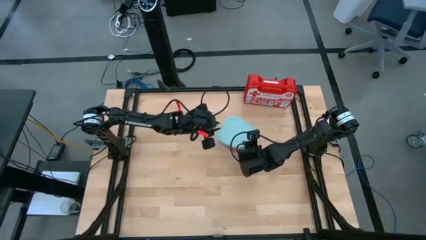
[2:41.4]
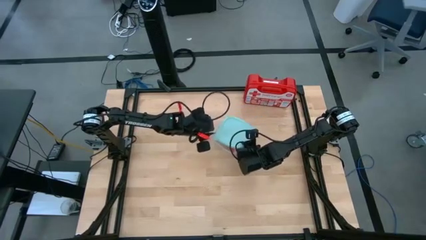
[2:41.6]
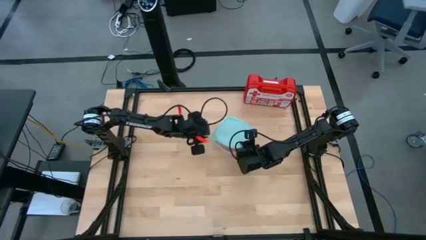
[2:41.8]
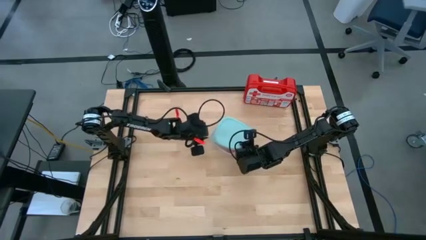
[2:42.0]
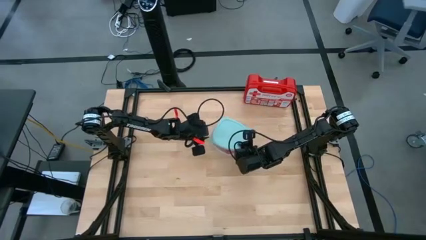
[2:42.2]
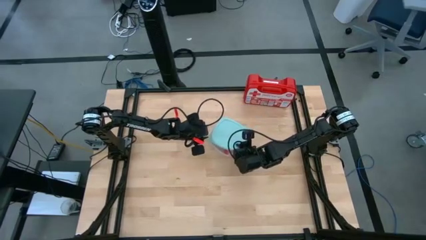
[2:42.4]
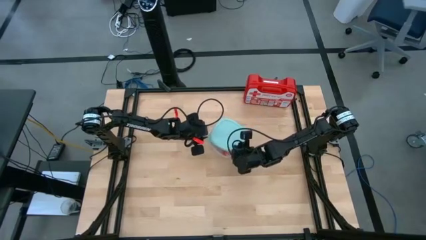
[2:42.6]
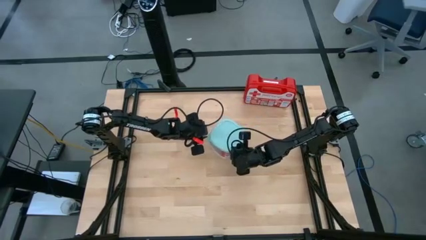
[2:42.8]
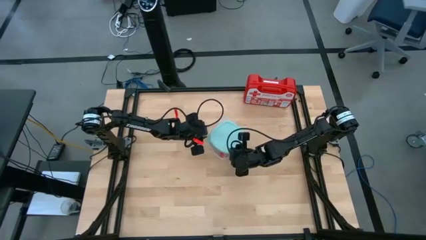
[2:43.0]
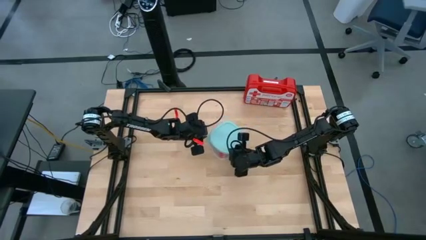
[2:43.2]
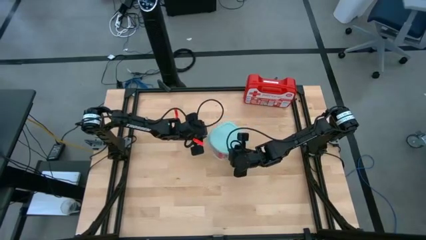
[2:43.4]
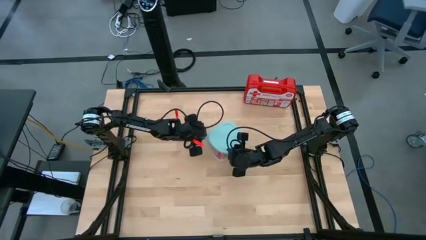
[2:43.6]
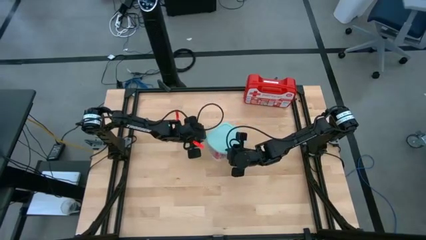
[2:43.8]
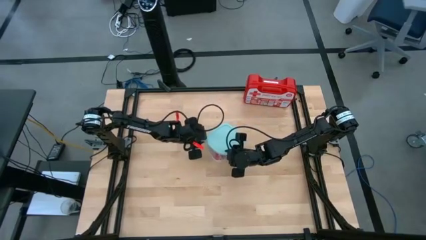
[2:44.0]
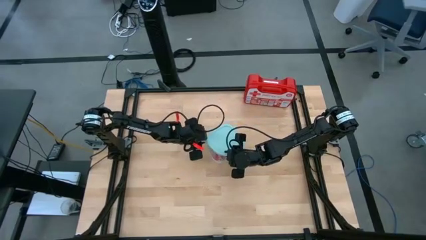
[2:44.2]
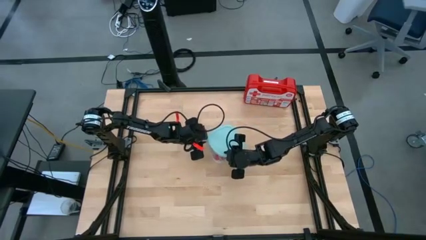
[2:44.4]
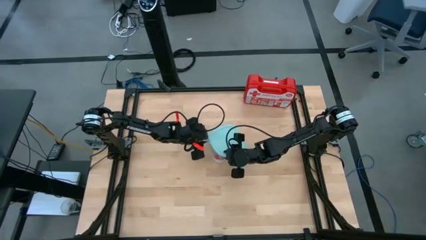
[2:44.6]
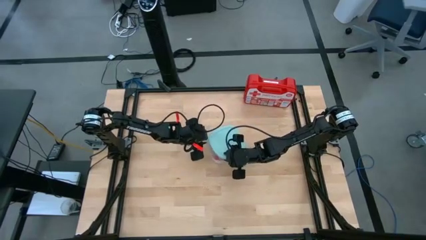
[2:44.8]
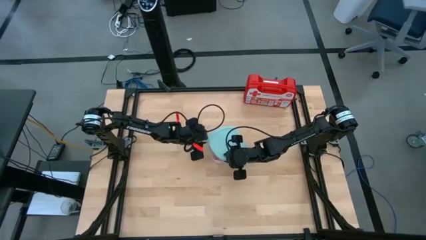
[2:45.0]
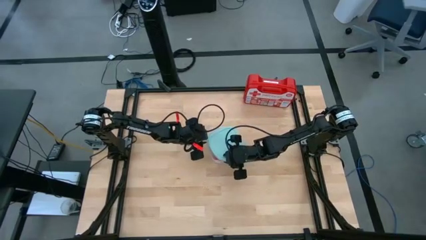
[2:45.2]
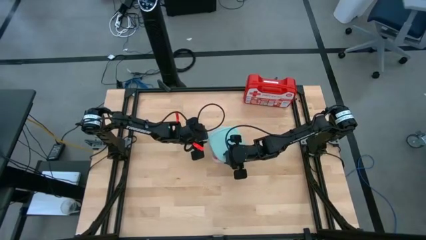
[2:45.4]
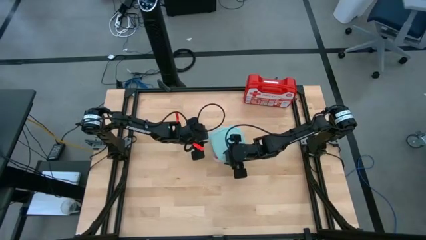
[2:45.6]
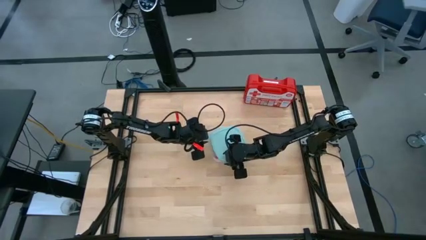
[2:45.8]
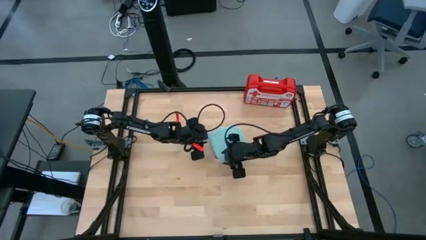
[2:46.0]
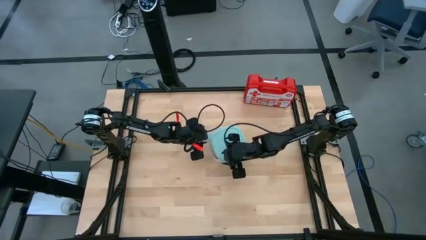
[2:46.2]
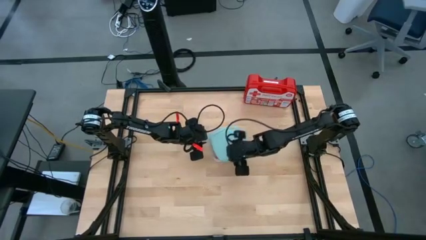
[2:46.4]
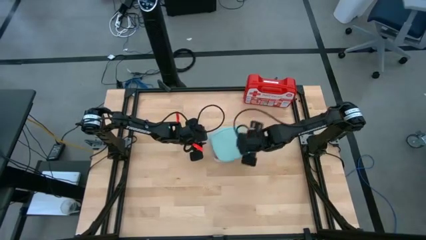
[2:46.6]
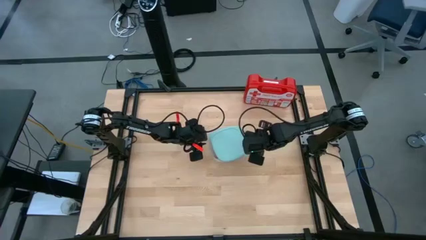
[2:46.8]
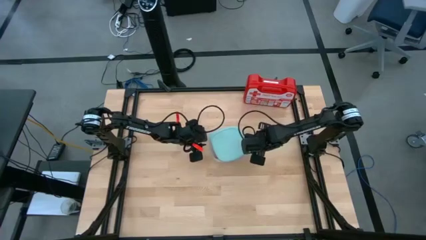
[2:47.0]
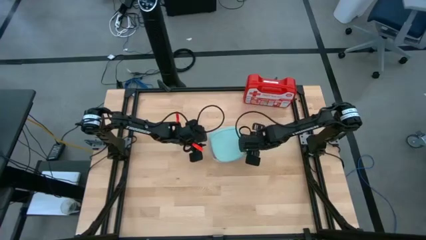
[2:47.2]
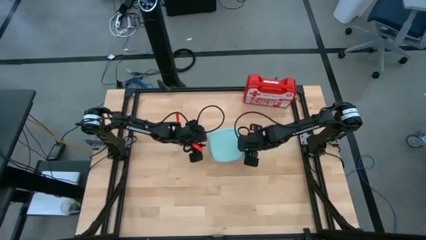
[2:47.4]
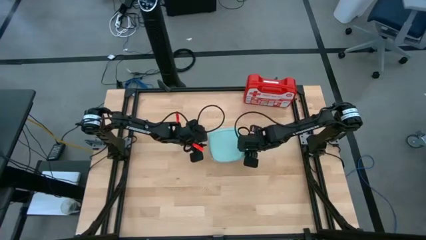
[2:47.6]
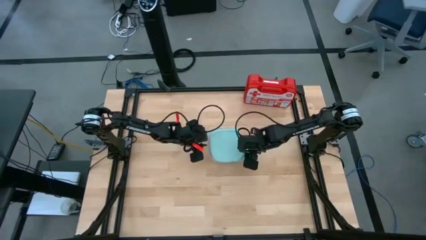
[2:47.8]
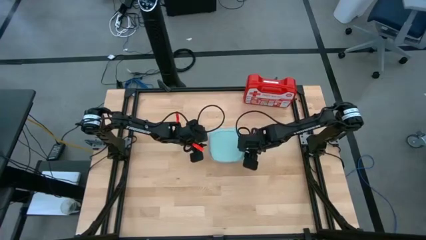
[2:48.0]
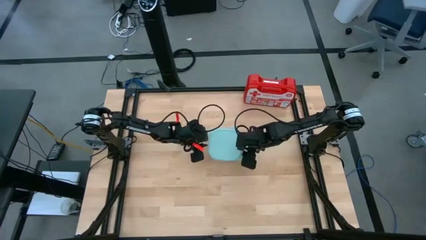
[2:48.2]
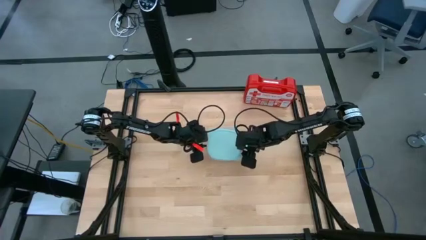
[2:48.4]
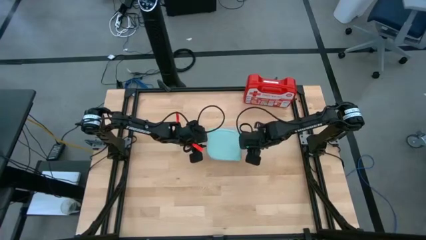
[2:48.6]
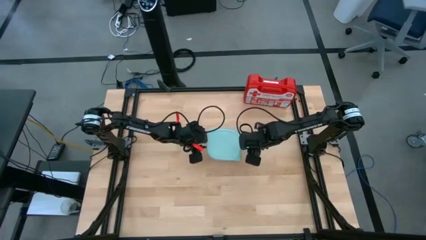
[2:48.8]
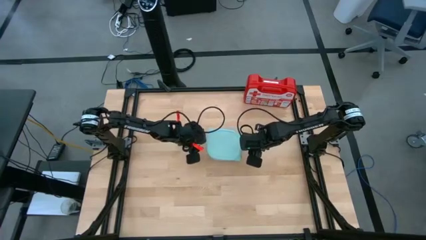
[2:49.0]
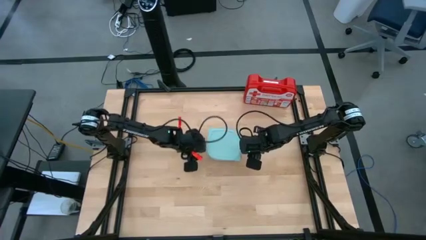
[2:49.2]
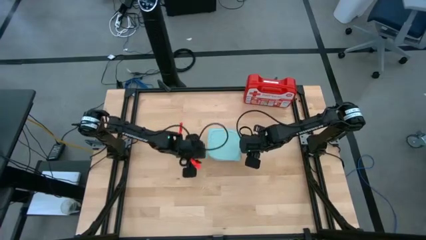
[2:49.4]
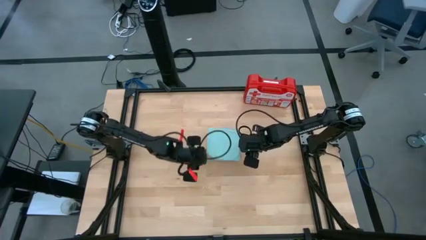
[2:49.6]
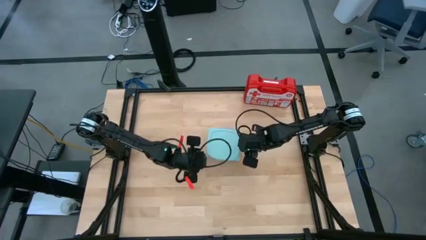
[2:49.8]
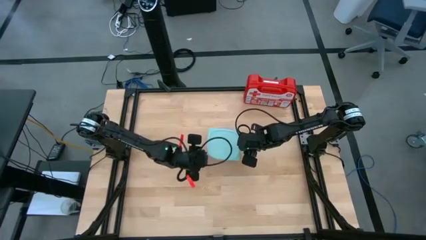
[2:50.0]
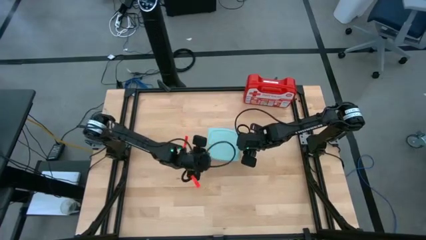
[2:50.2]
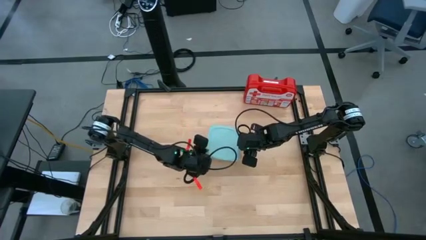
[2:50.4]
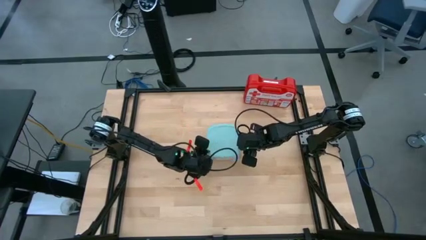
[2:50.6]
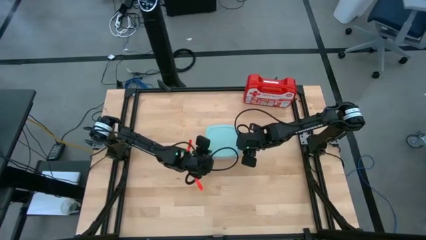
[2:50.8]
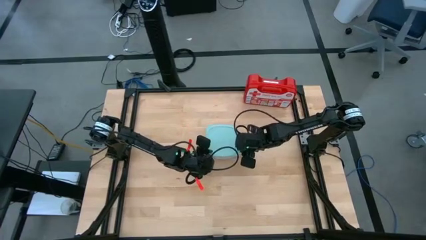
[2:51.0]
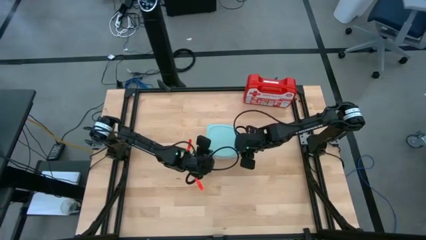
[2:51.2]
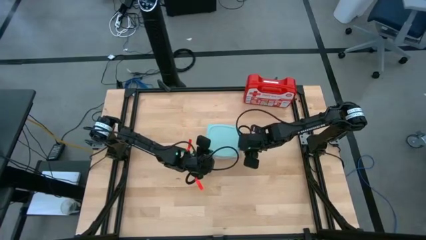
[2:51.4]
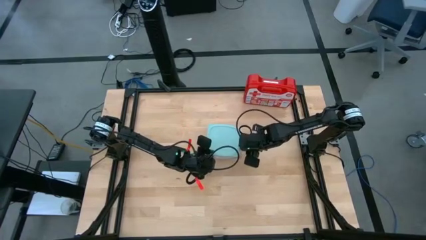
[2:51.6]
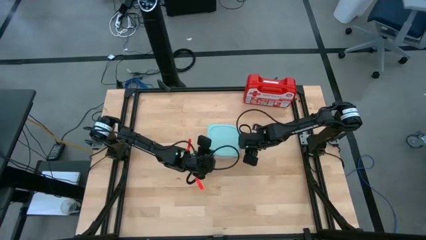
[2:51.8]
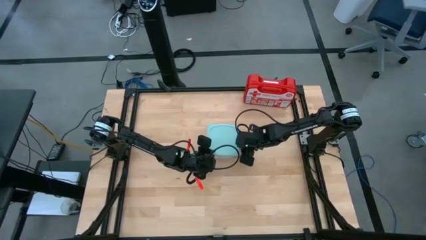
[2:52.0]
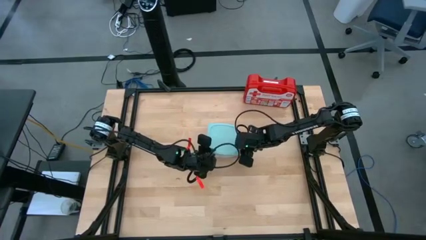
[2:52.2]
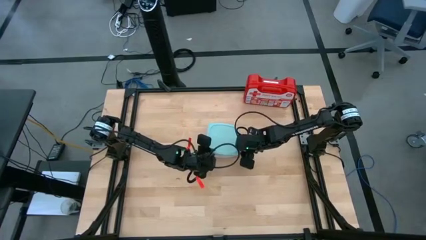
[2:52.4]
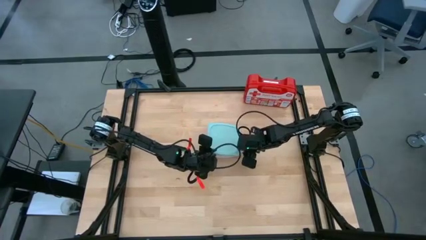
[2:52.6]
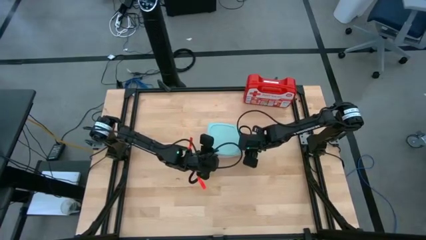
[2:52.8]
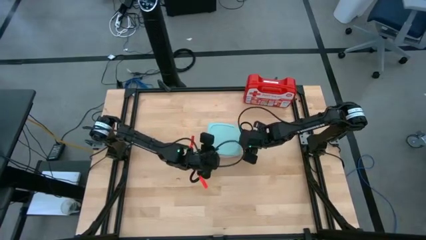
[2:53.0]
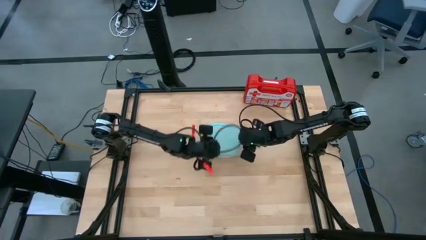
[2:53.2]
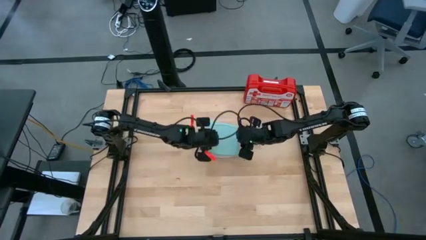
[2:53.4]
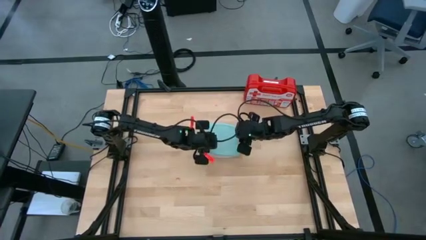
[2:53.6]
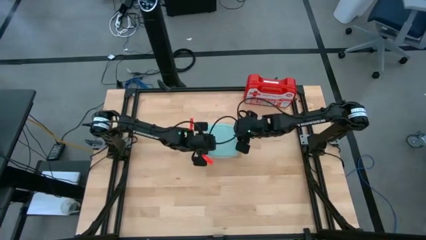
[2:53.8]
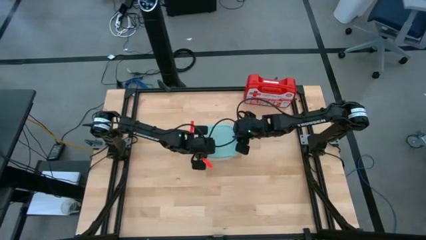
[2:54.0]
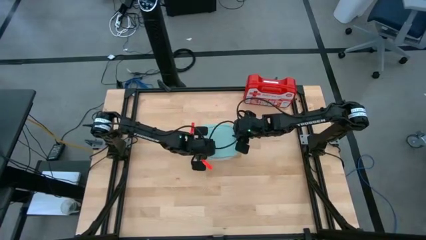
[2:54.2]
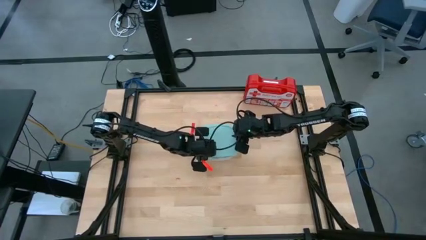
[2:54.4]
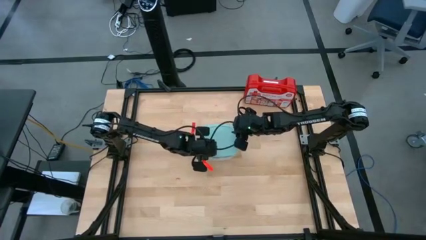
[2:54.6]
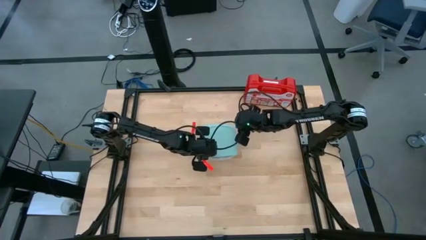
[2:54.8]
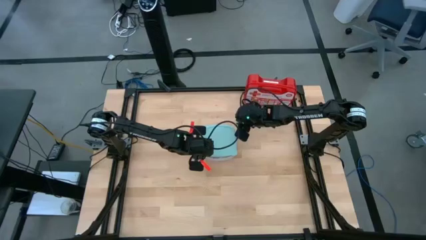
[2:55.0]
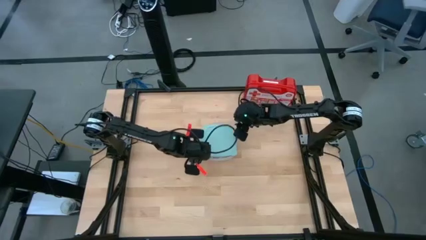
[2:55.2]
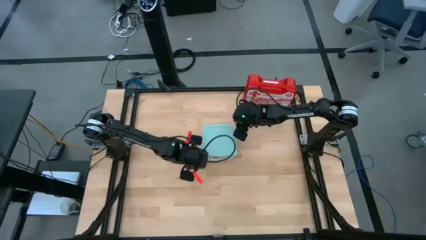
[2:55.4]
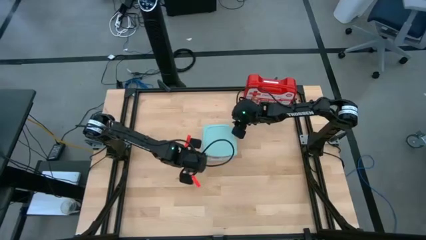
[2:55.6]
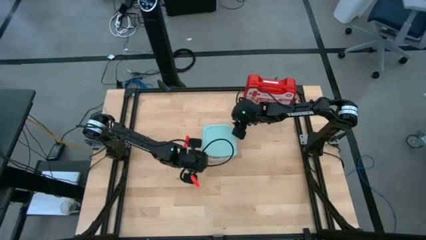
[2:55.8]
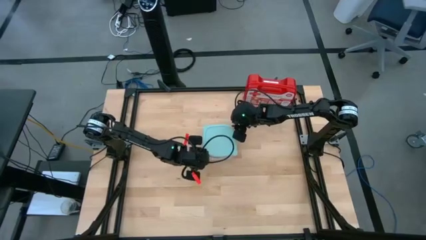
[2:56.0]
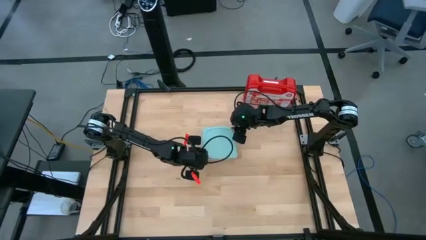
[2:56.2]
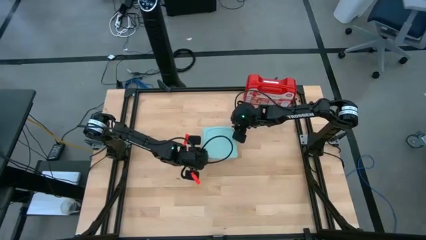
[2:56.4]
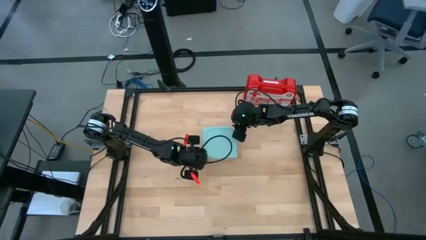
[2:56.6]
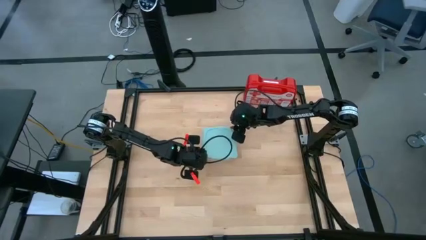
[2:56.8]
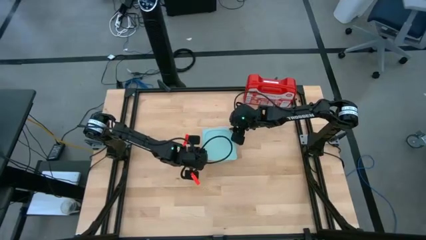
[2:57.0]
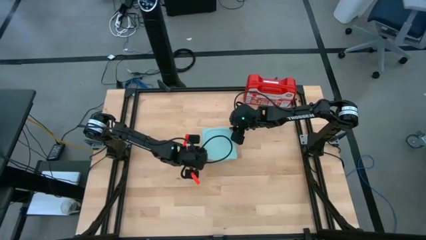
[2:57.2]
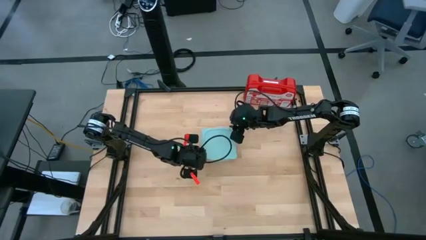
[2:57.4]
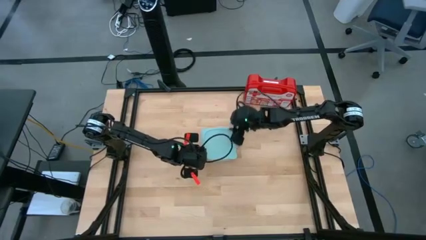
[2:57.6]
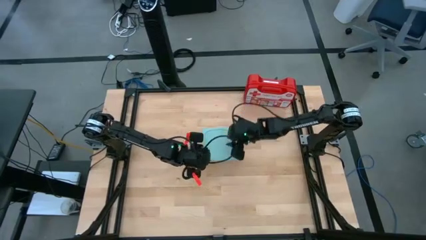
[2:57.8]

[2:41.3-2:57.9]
Task: Roll bandage
Close the transparent food container lid
